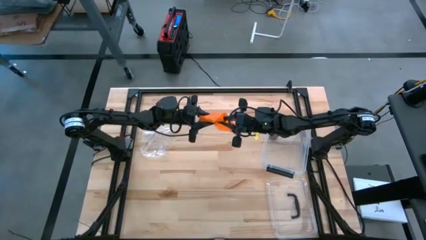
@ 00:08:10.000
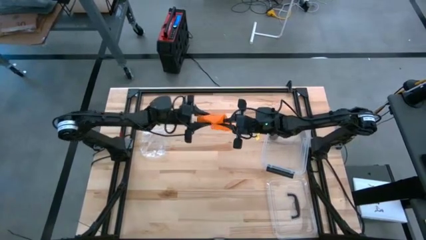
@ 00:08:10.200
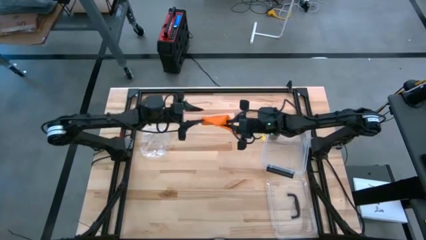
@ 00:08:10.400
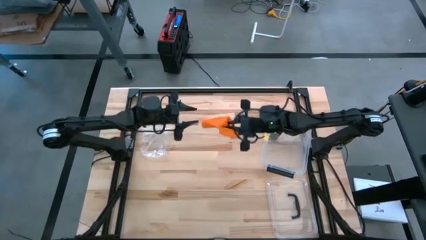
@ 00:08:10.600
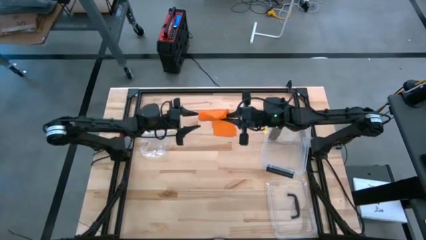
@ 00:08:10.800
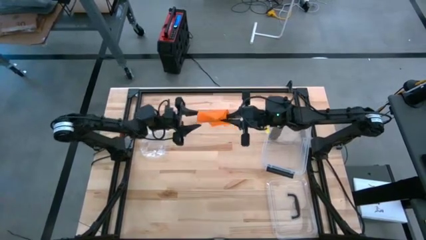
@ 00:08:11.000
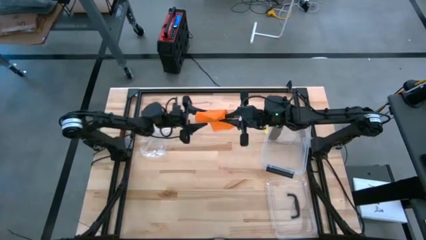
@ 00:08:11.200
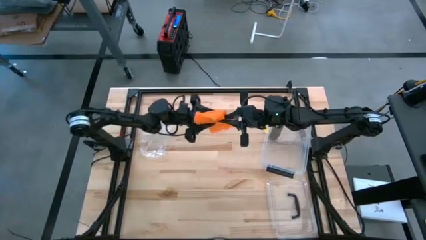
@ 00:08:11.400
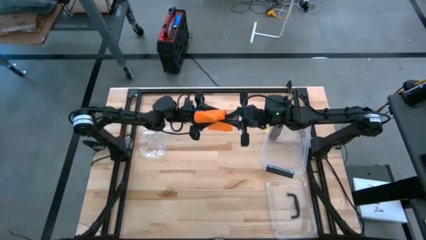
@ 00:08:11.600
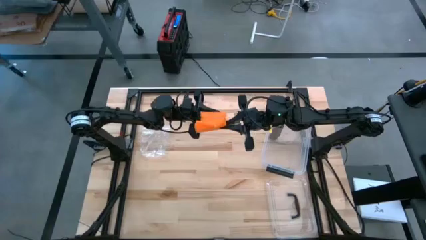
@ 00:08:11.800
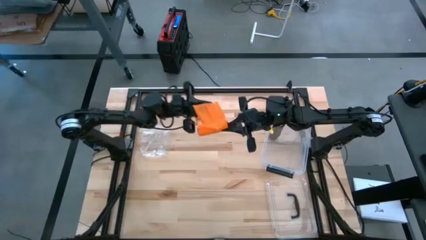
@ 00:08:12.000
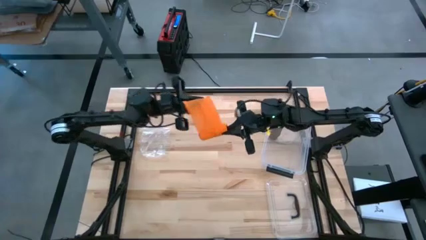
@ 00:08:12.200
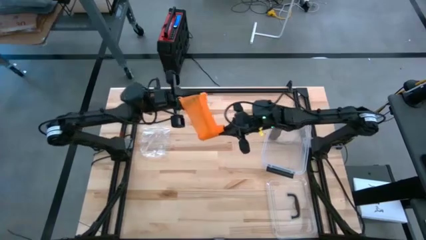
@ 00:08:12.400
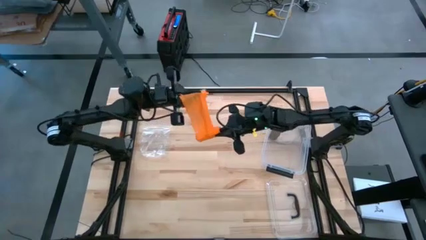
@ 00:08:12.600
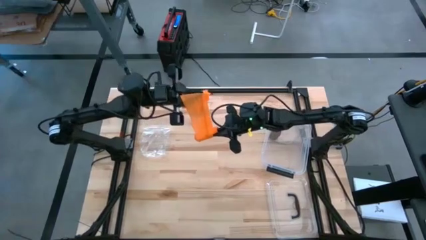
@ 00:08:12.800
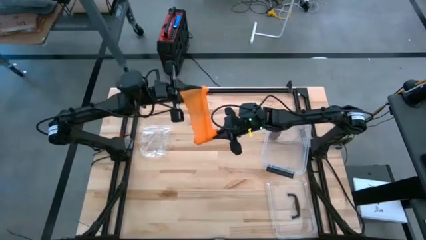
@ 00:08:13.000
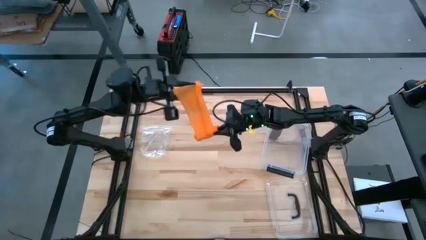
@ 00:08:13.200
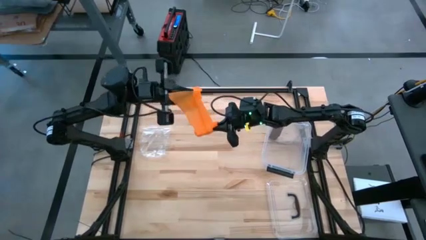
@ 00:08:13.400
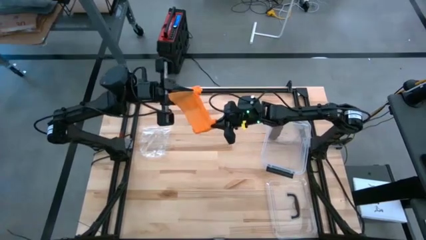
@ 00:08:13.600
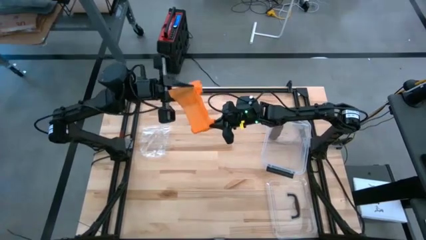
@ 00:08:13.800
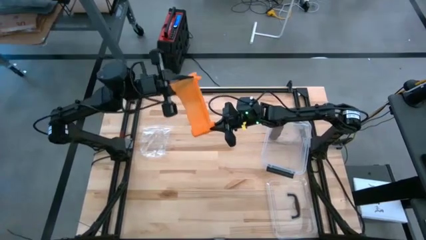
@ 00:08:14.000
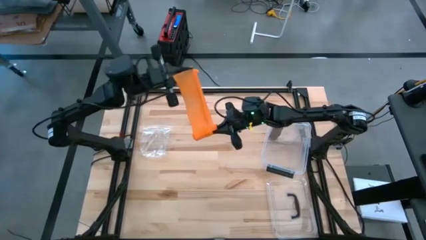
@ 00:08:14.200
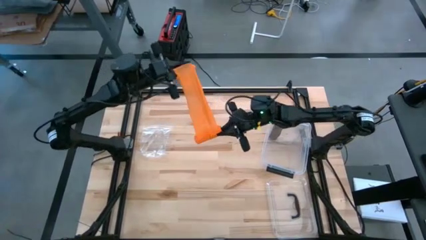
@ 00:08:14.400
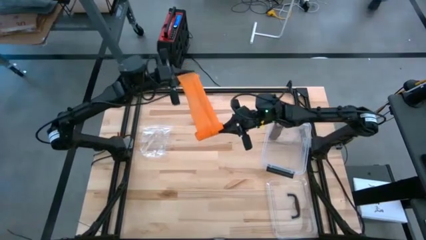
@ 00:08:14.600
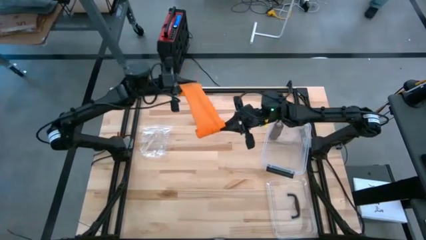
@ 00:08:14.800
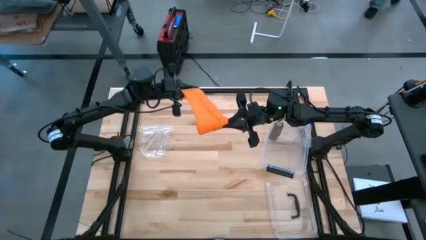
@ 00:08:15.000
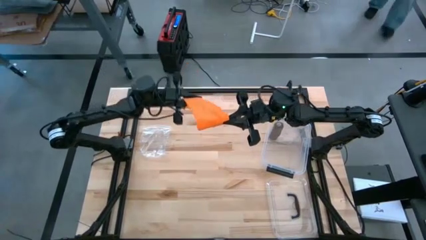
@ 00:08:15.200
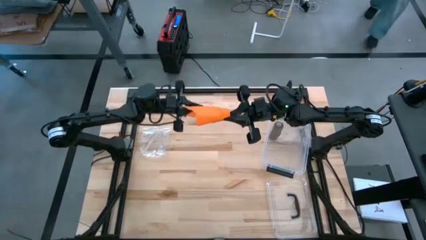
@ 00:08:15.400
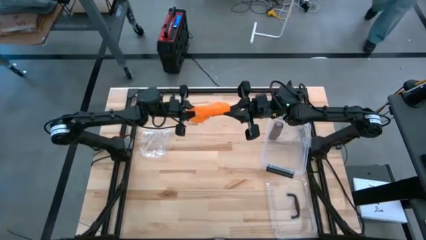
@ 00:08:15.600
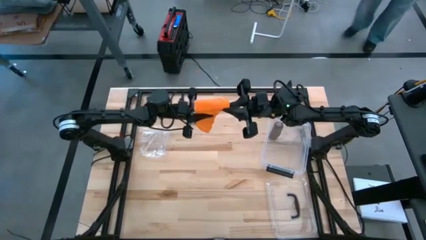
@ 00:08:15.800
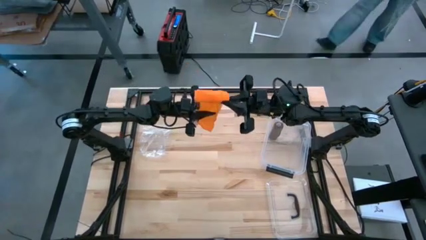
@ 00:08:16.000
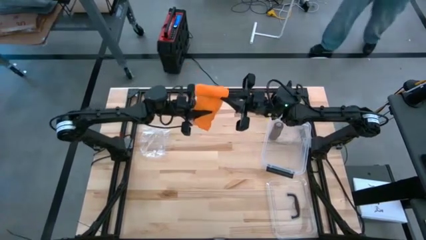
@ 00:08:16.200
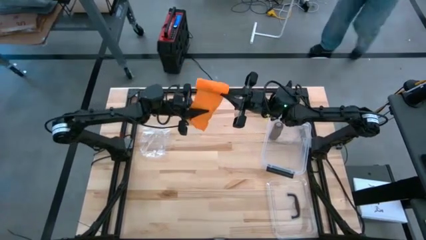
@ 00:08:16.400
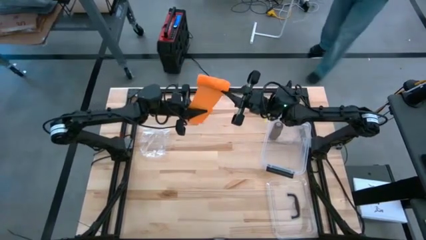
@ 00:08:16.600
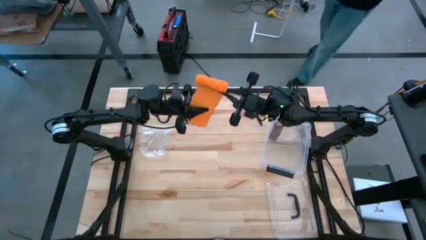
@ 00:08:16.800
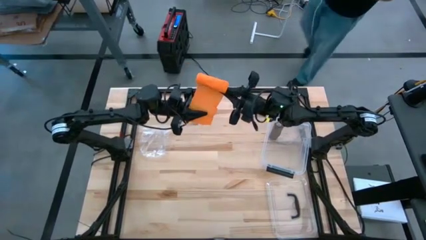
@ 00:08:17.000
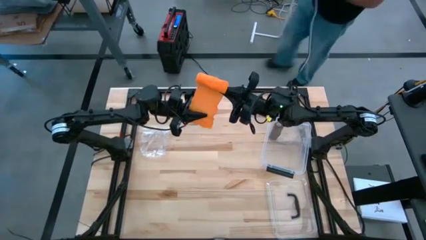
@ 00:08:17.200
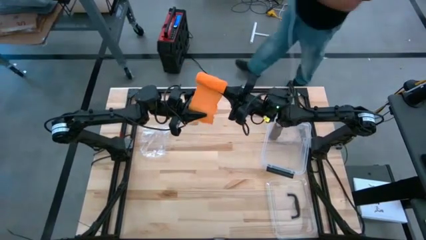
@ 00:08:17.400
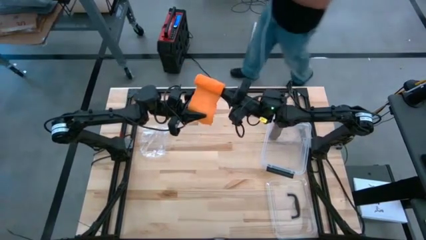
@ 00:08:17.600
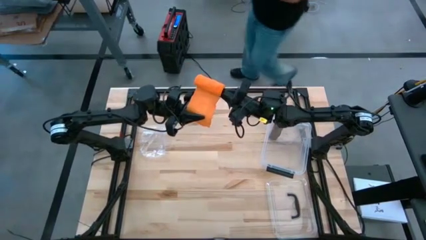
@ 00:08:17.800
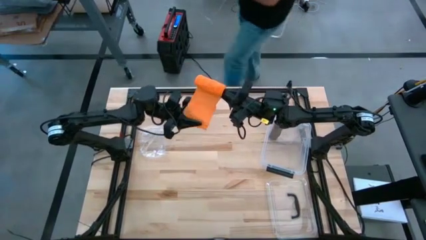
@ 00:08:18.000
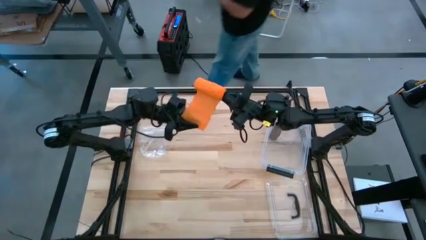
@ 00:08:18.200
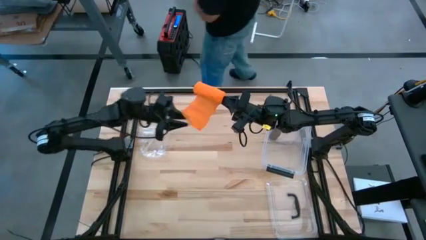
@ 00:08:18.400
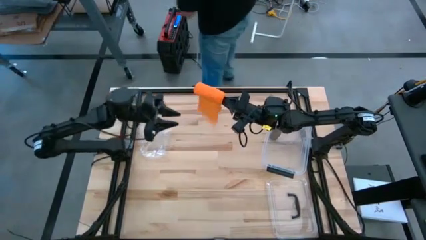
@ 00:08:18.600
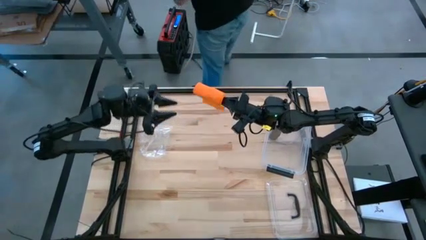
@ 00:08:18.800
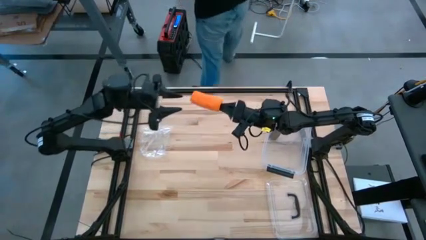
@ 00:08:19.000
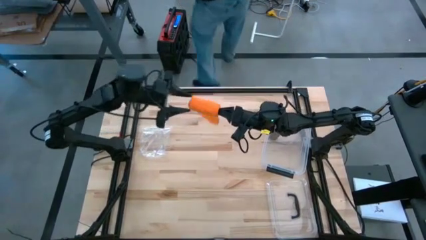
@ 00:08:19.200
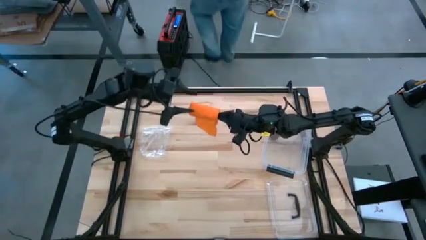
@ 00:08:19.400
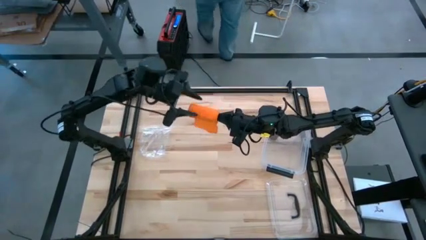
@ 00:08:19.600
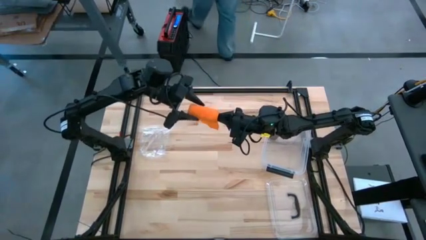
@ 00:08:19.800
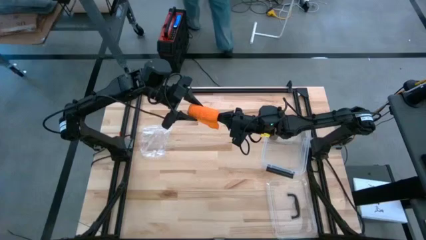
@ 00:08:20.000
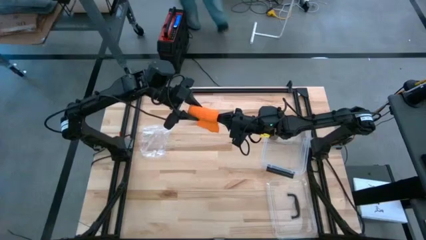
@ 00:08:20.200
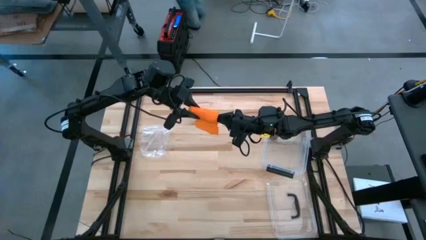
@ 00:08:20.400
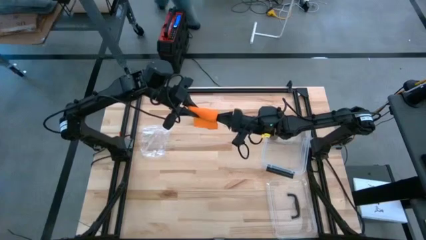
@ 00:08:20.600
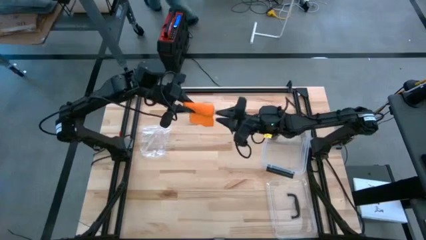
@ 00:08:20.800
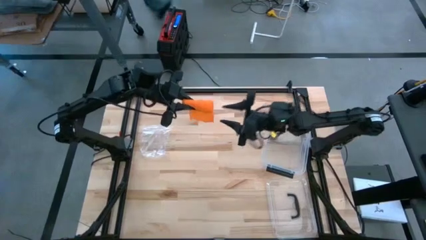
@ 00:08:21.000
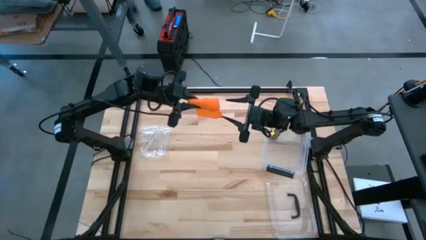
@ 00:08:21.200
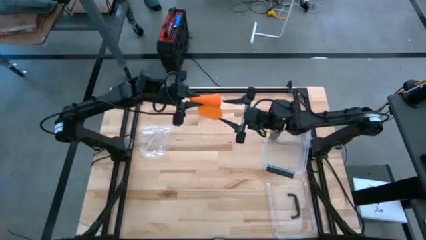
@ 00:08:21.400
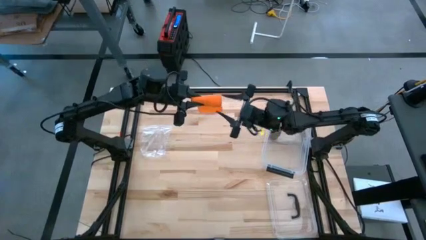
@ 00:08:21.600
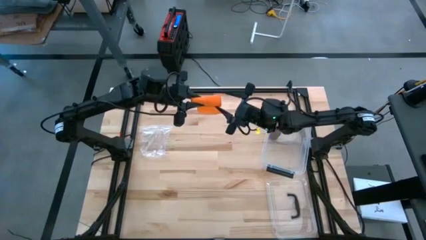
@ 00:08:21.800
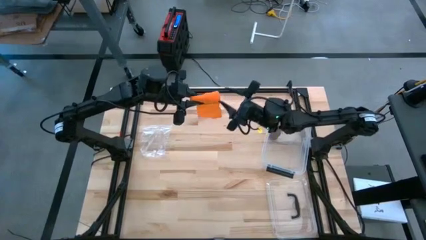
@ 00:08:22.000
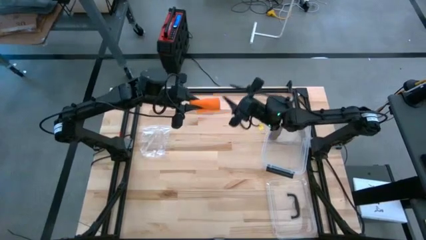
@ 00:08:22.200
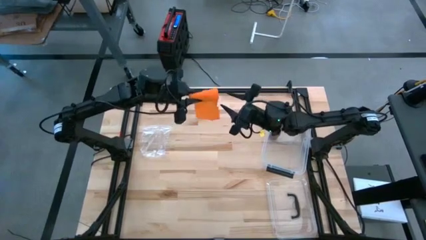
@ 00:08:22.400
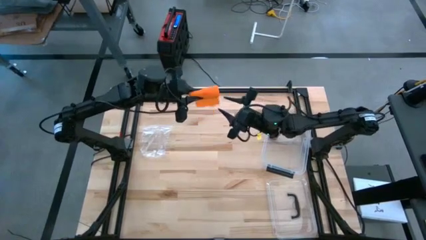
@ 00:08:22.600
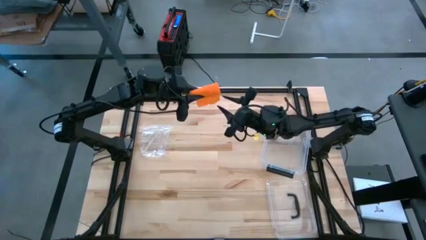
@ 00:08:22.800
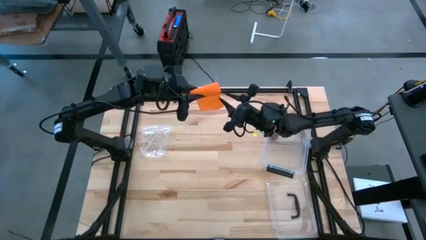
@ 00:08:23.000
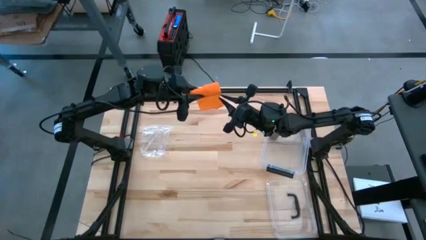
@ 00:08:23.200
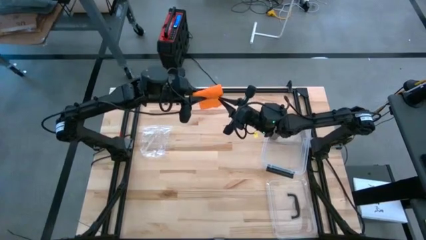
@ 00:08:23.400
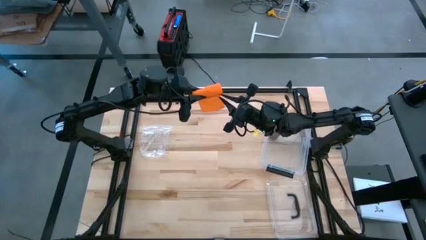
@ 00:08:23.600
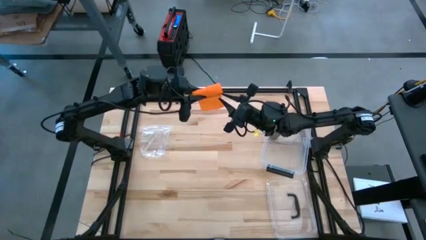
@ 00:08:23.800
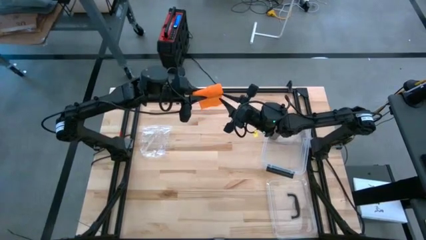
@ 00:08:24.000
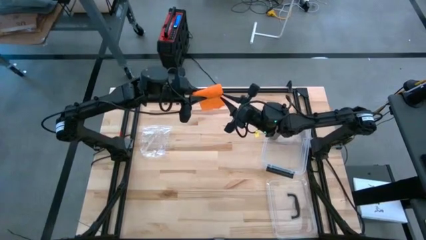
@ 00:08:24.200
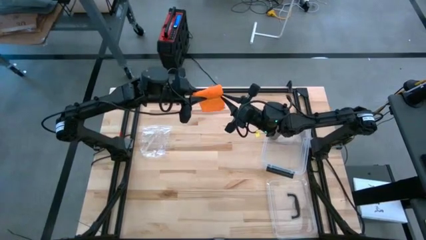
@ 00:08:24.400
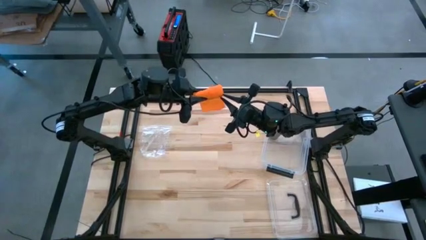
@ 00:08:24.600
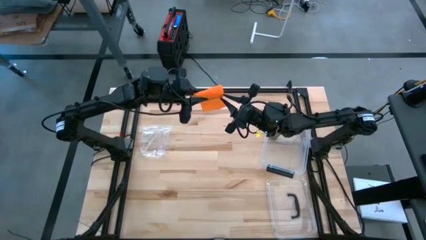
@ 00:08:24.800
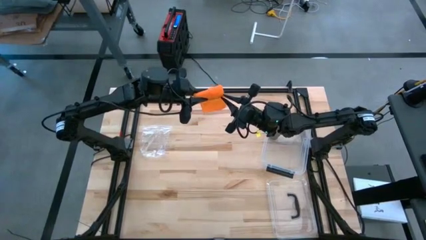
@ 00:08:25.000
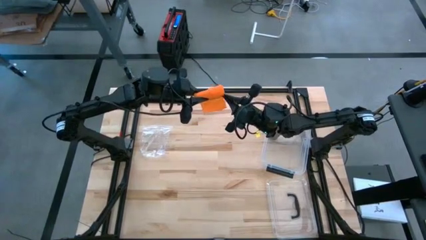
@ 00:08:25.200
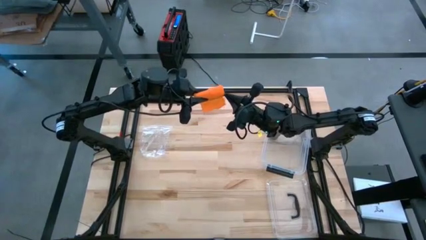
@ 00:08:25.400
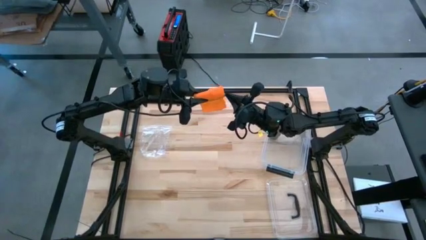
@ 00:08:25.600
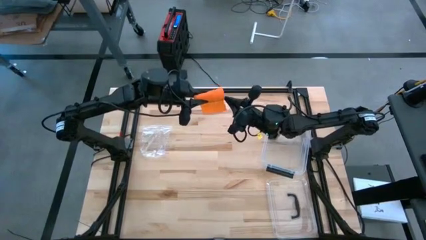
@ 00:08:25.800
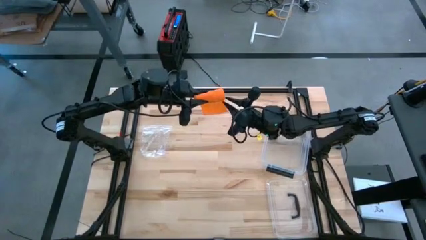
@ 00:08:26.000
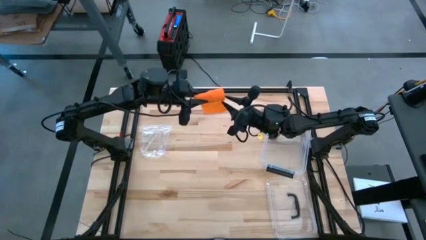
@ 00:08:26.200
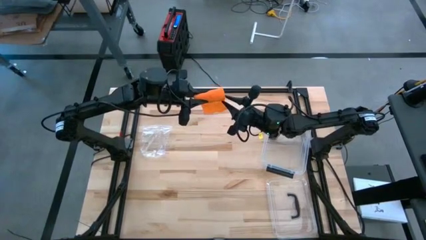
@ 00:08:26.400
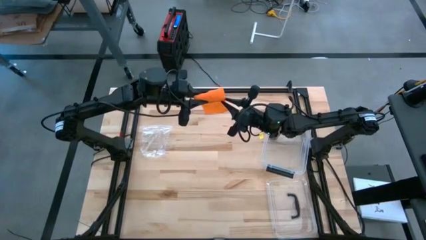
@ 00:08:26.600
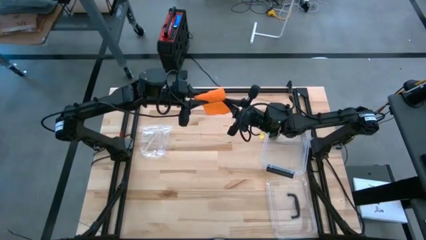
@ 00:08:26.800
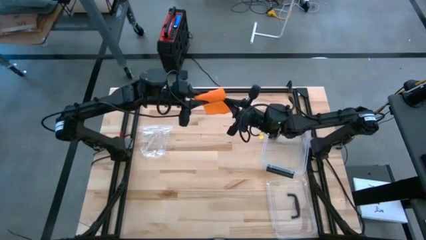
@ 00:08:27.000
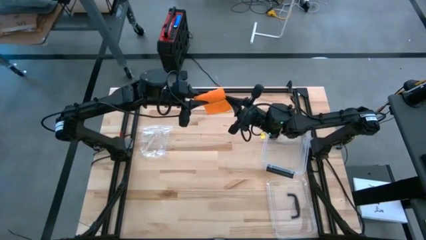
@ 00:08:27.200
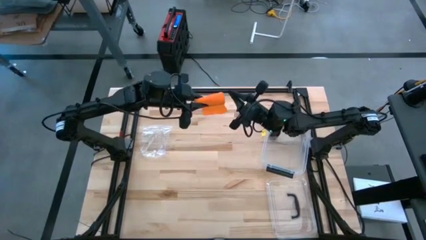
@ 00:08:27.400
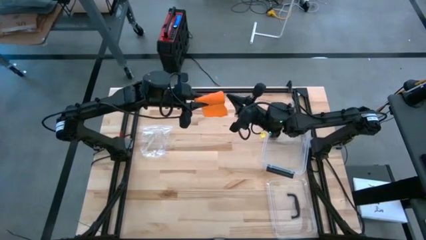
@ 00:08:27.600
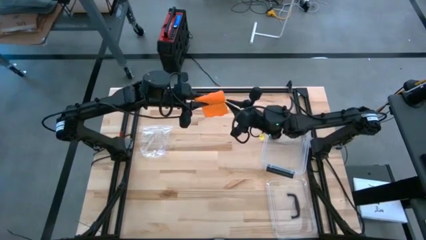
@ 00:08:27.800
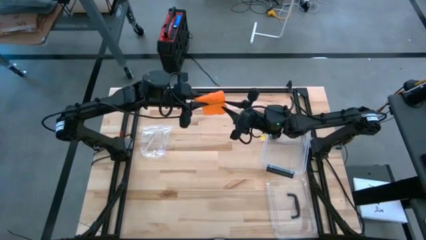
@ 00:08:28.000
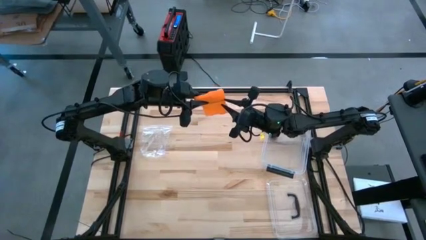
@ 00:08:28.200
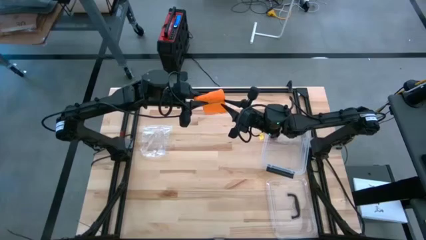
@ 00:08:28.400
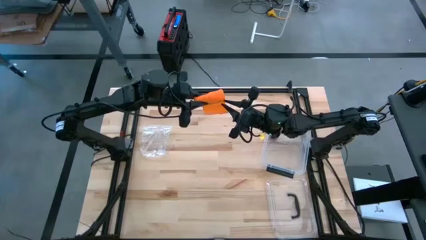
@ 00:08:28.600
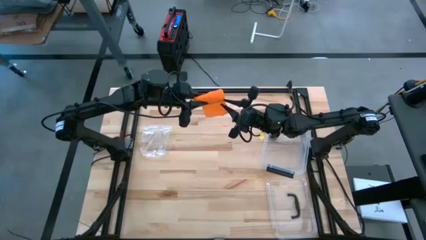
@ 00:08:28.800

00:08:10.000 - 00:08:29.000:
Task: Roll bandage
Roll the orange bandage
